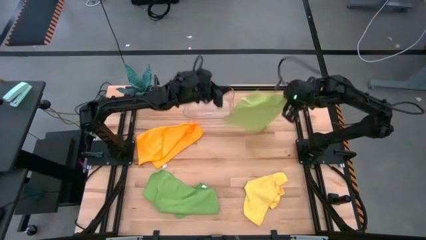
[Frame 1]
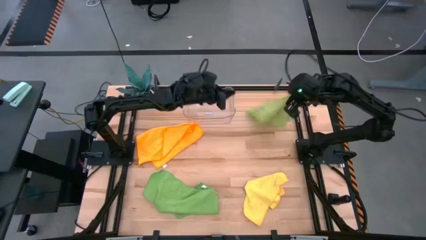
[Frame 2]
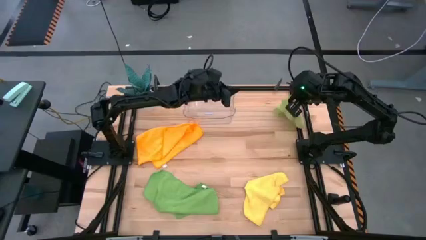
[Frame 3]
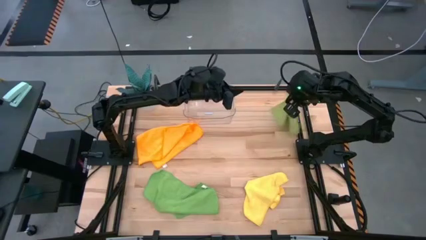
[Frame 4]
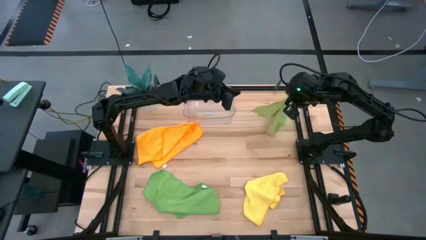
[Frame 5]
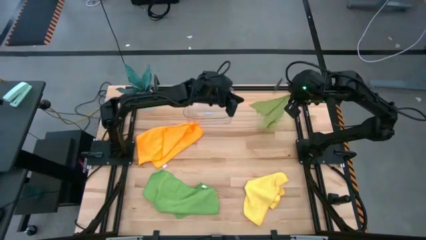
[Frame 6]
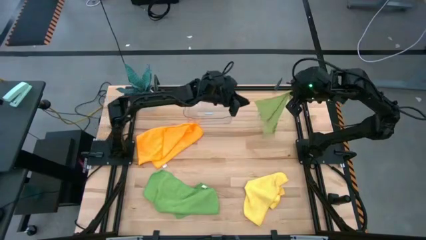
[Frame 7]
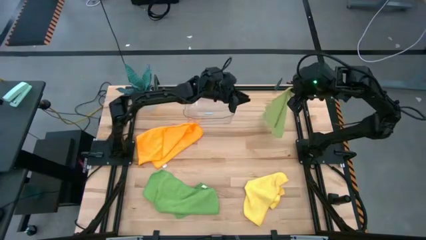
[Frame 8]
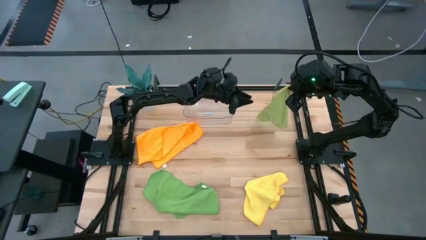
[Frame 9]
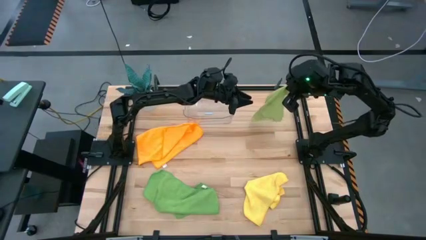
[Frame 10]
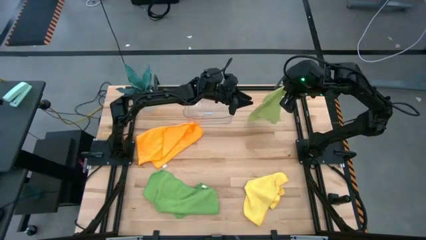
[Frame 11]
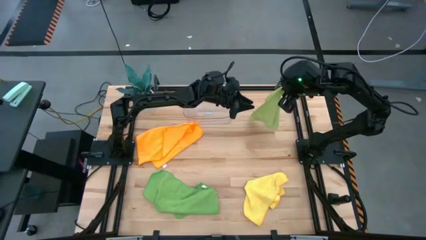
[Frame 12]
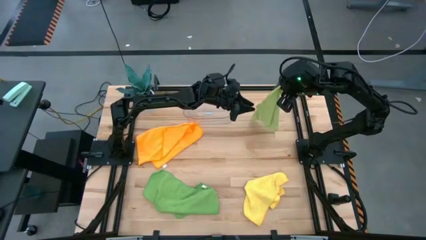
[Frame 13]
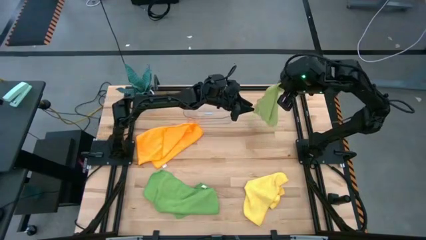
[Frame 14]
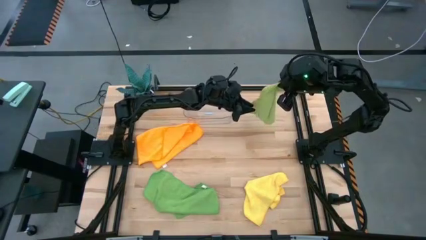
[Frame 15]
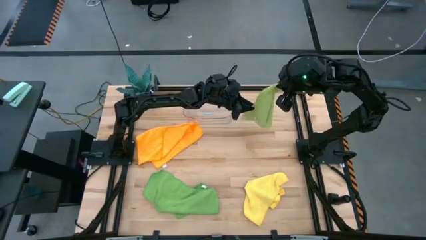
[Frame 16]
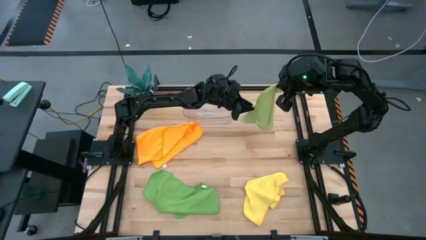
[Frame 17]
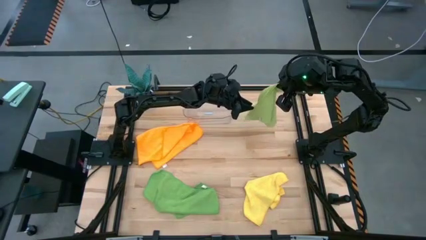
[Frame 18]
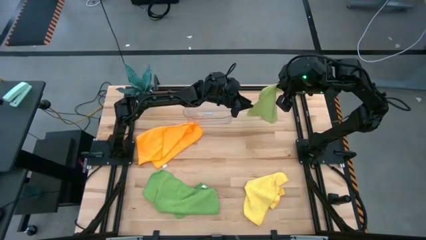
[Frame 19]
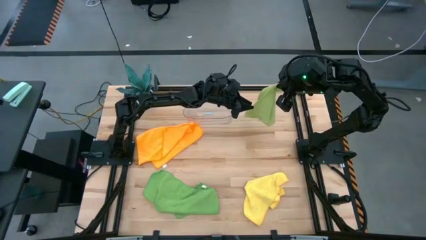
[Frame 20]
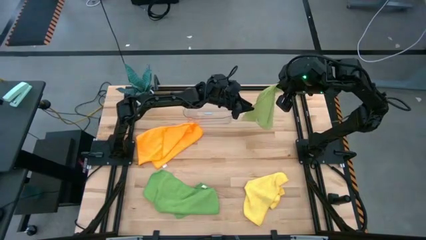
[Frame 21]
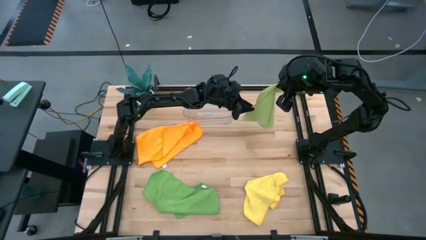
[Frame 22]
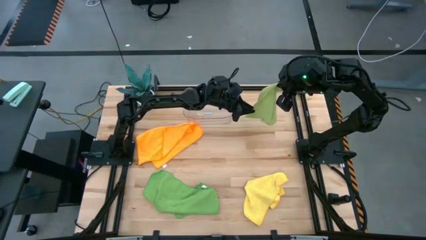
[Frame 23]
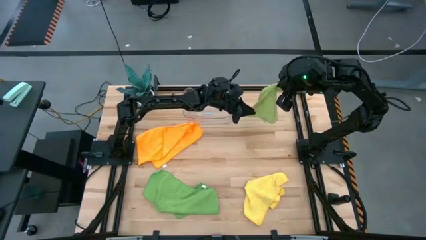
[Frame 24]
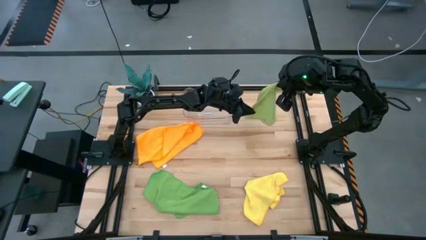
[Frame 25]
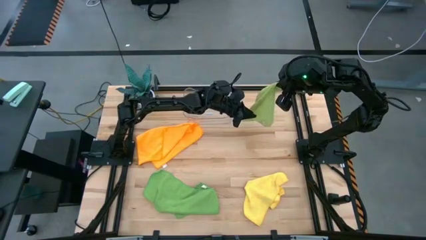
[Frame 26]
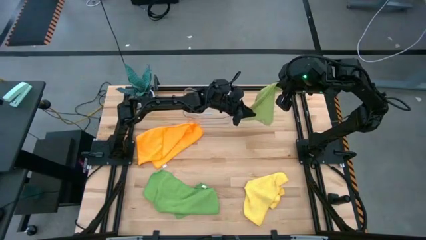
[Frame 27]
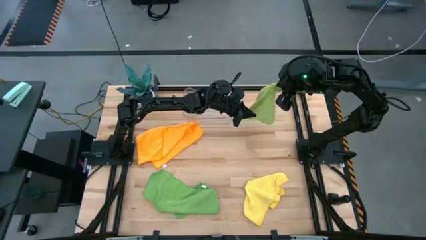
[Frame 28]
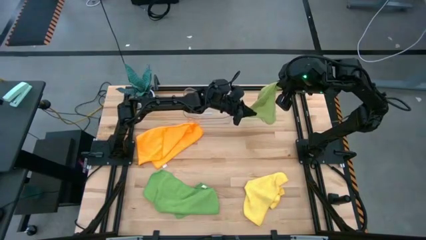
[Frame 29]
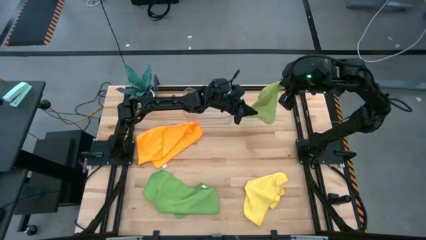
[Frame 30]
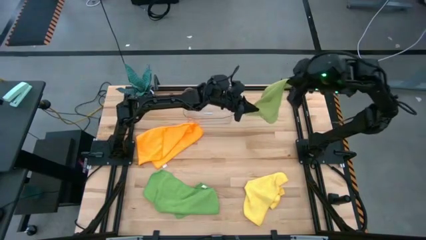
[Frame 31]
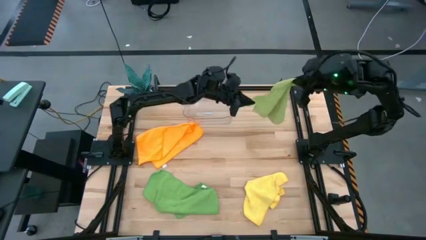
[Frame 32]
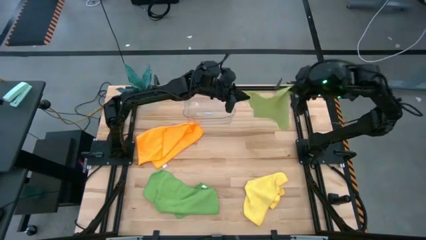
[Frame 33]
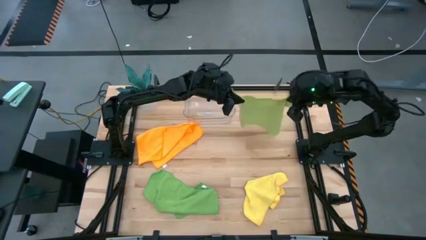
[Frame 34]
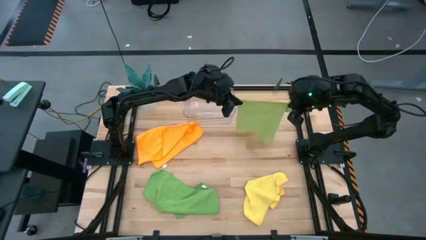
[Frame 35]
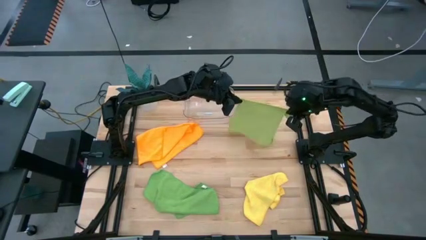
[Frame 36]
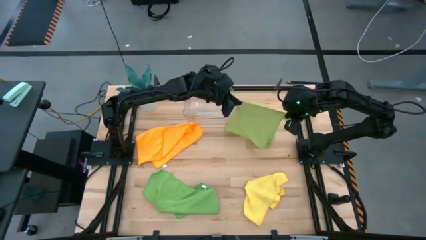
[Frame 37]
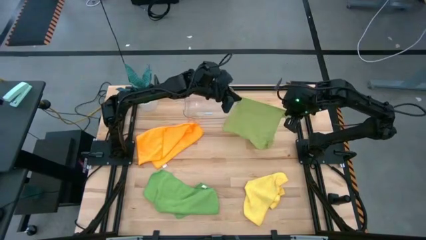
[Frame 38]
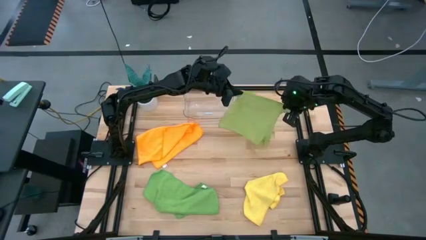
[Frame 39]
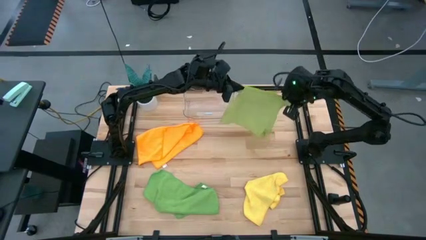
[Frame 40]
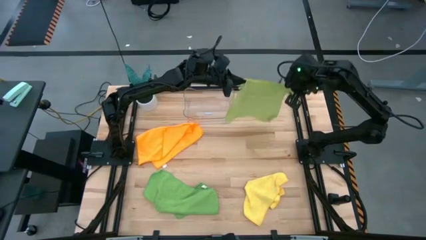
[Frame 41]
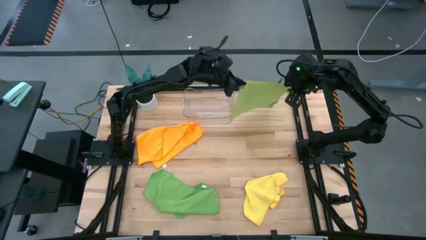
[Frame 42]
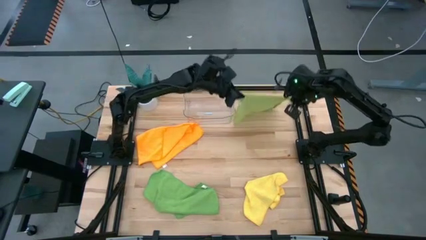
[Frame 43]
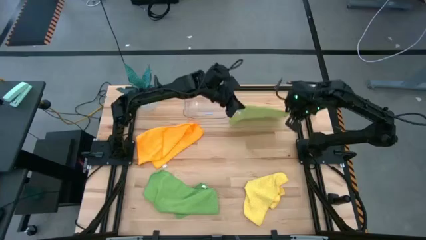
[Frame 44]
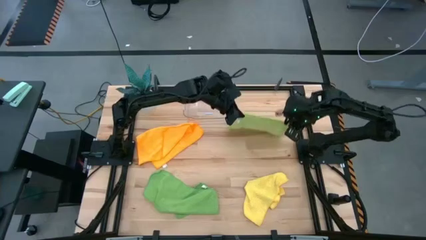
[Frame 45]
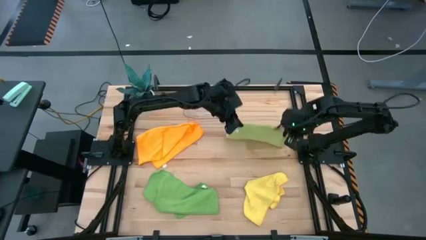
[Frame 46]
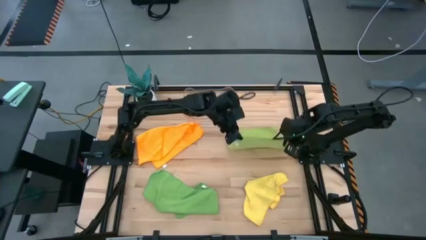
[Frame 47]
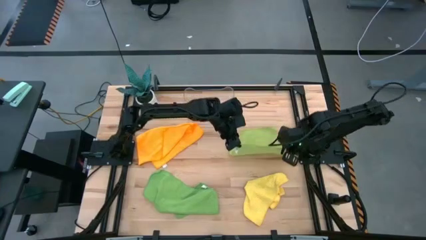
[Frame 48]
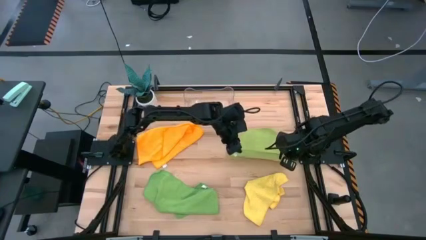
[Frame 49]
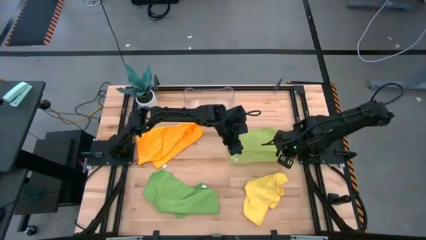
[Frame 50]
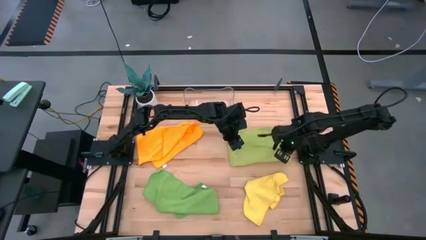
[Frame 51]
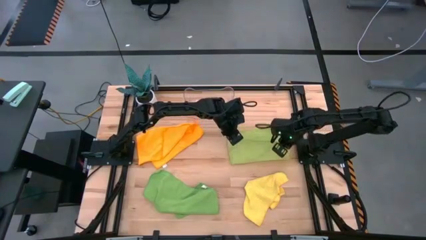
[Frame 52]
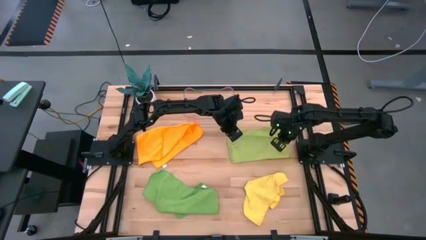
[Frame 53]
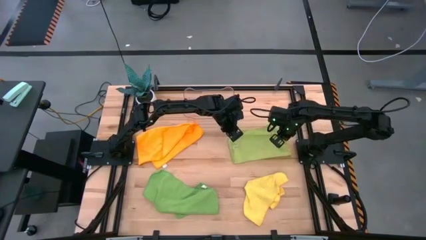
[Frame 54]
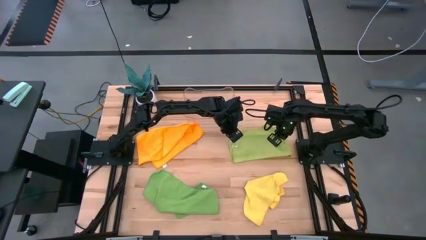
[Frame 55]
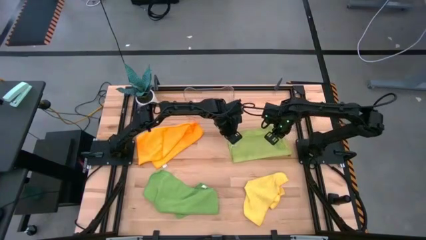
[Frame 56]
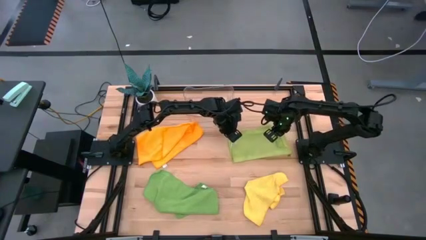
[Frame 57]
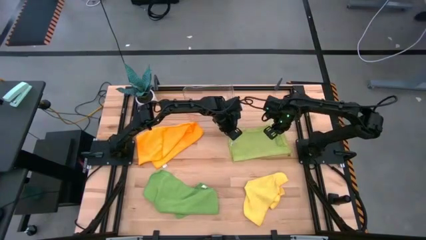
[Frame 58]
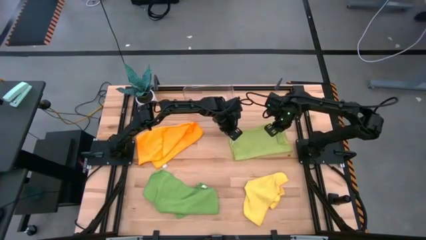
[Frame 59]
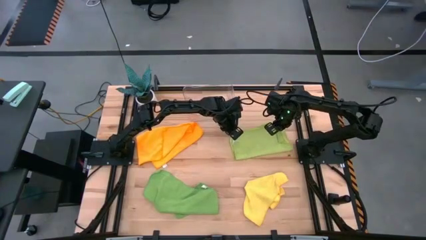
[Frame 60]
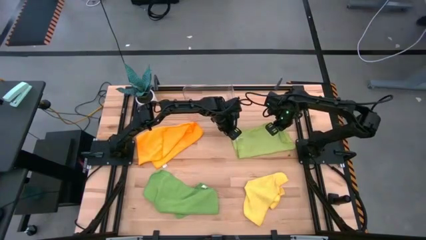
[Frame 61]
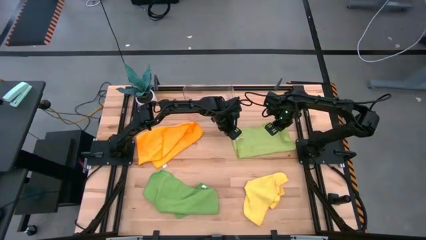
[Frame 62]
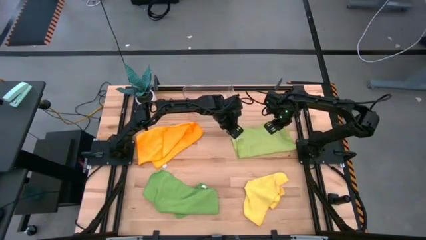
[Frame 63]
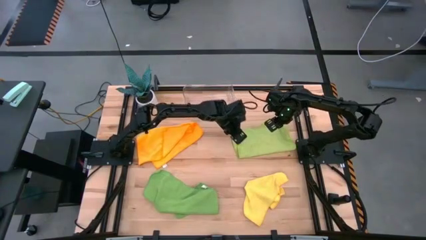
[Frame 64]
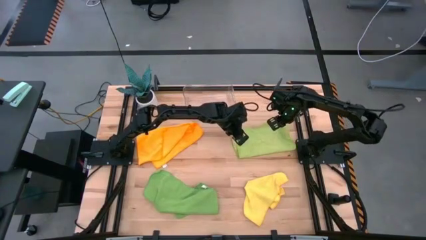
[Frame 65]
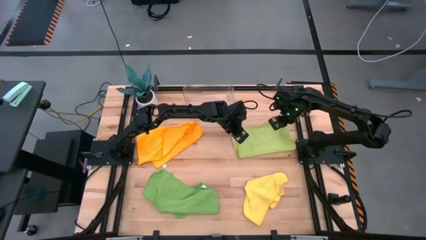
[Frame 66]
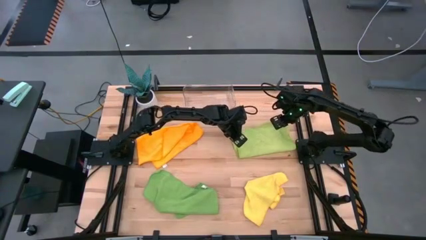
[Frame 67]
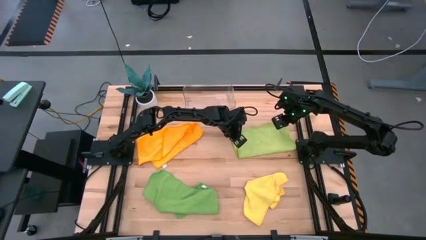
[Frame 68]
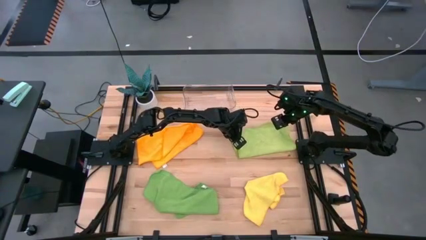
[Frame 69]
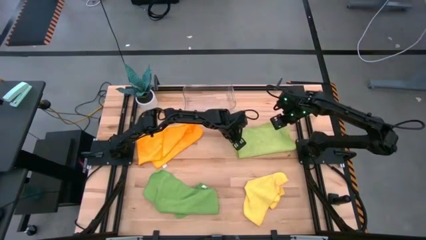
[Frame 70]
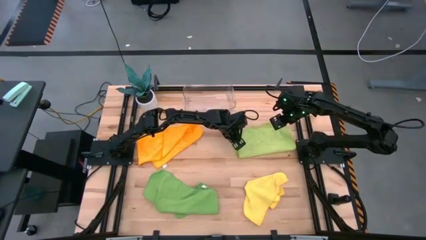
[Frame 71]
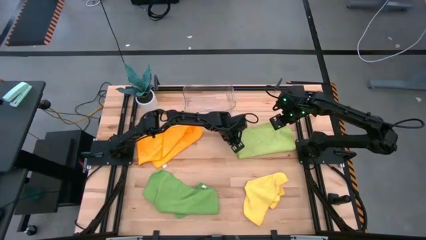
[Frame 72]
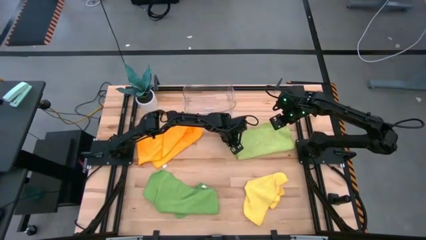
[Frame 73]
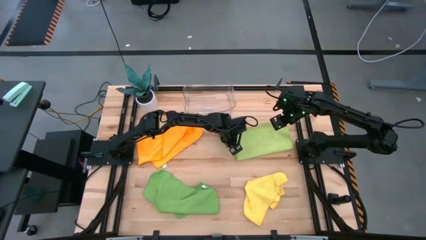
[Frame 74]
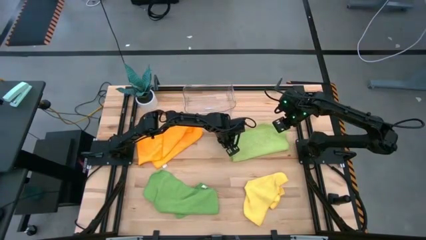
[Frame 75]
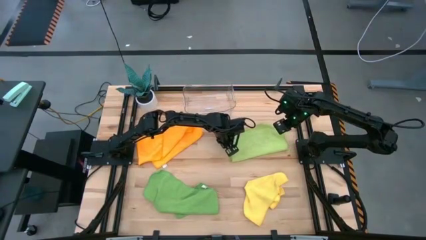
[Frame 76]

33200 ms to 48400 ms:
Task: Fold microfiber towels
Fold the light green microfiber cloth
